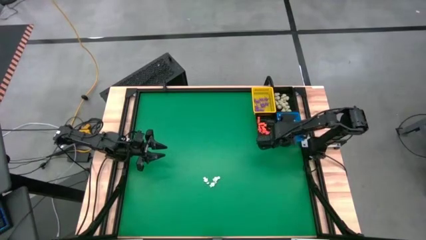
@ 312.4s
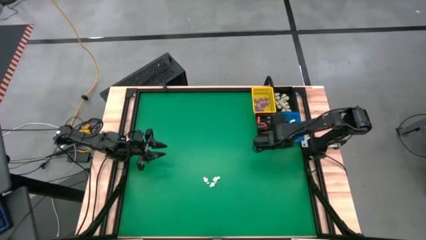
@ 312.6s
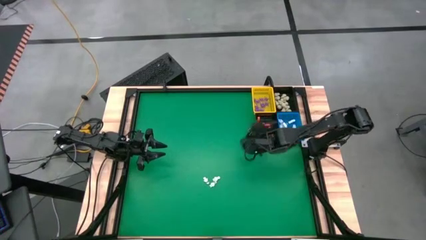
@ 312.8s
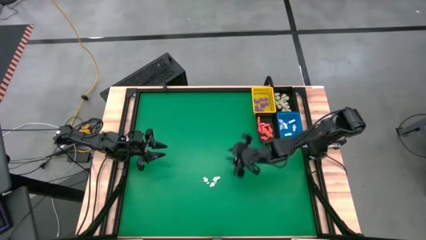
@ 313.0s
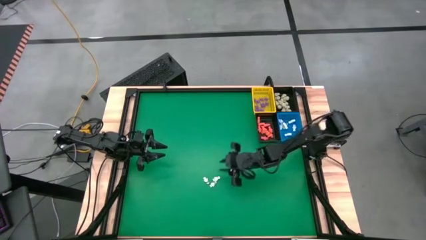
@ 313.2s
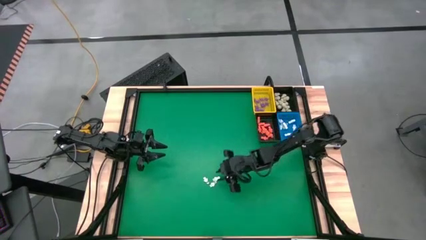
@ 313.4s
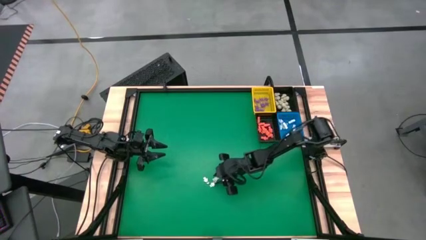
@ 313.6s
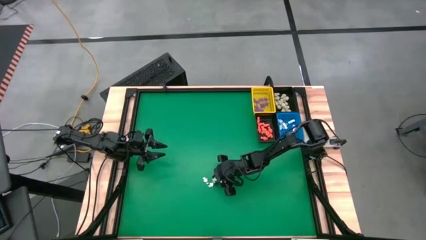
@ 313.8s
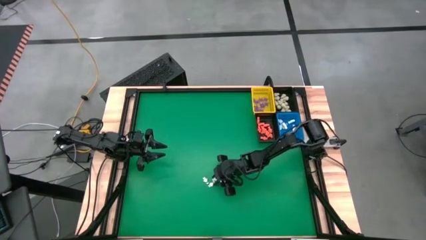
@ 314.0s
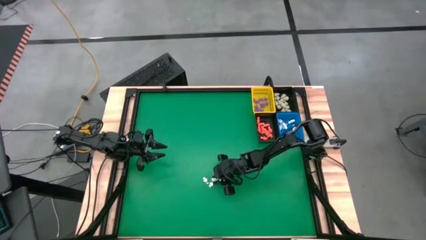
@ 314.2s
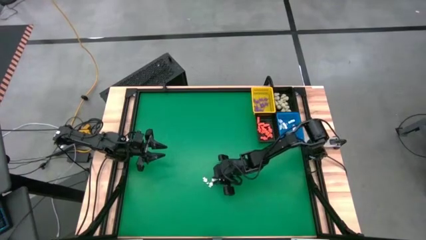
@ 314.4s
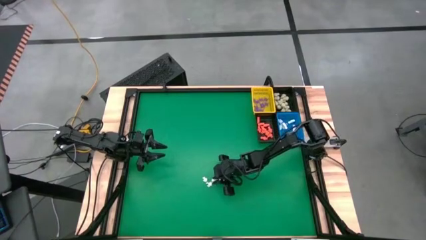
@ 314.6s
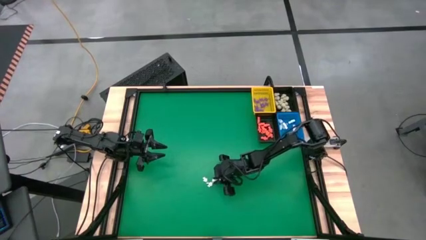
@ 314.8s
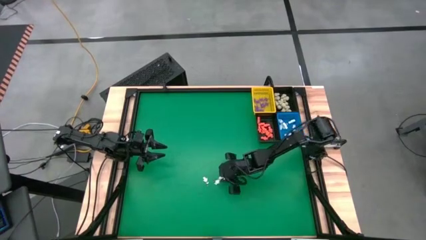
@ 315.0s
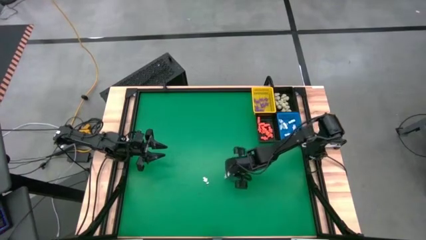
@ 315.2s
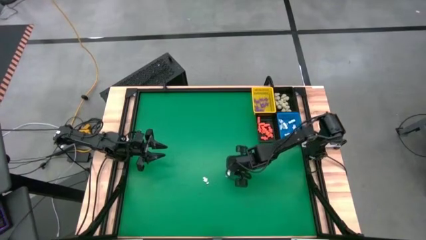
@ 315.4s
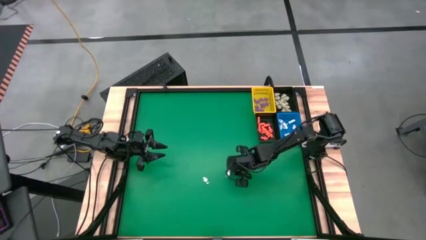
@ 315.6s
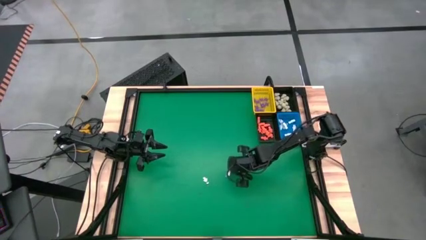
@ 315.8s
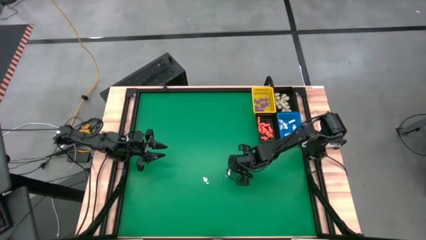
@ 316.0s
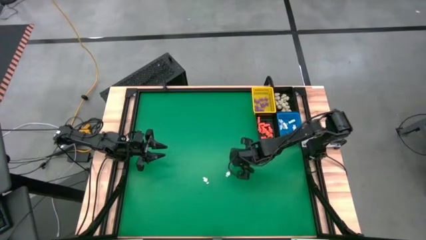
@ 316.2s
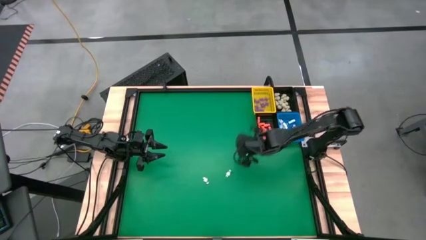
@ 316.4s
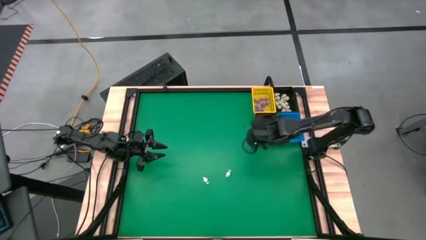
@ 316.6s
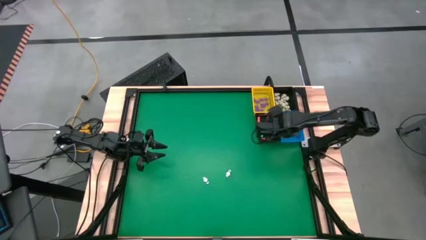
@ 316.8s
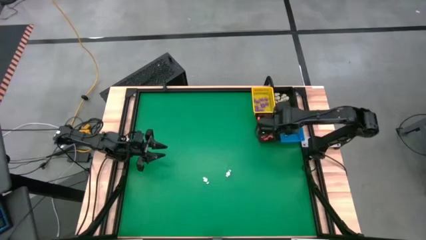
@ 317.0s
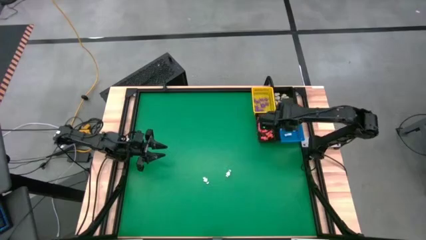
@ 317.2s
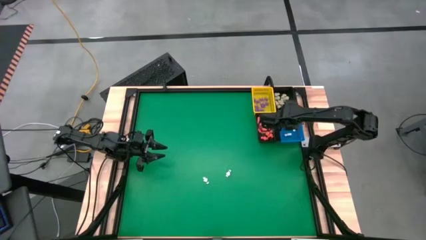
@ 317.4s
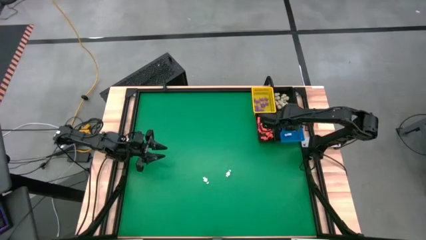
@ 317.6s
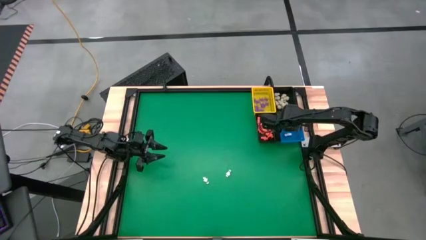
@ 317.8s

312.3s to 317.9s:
Task: Sort Halloween decoration
Put the white skeleton toy into the blue basket

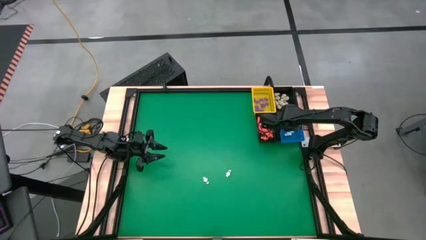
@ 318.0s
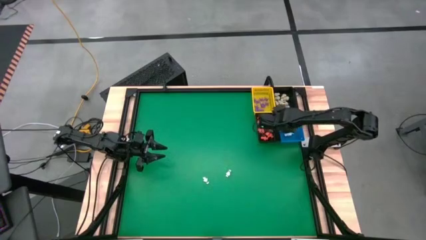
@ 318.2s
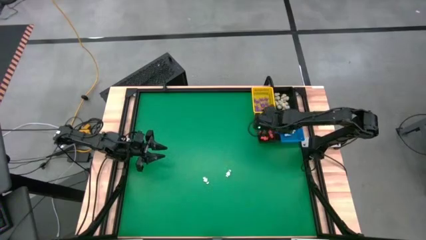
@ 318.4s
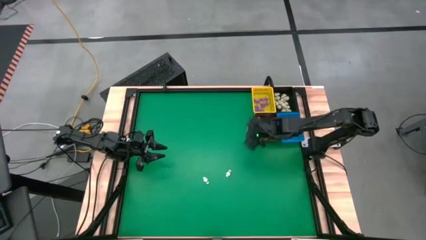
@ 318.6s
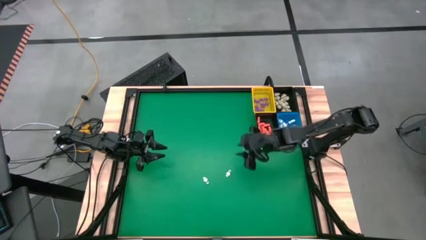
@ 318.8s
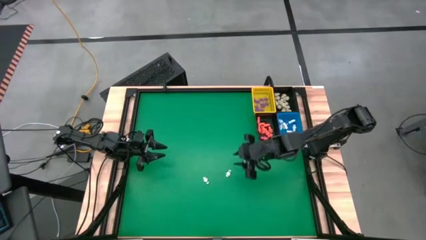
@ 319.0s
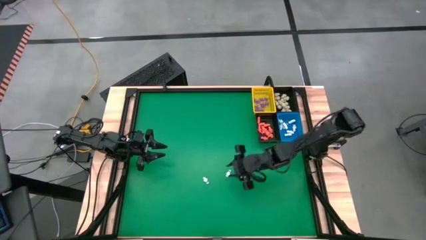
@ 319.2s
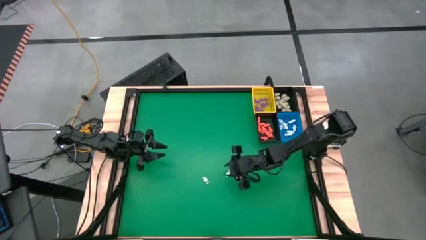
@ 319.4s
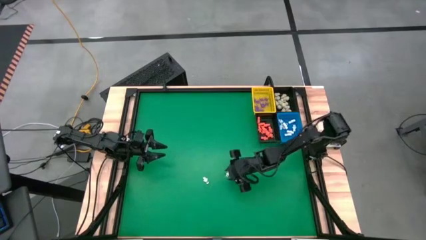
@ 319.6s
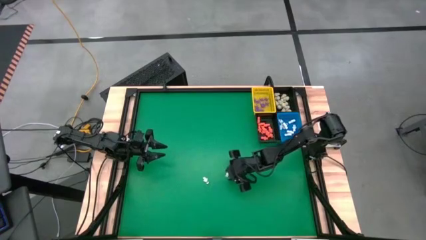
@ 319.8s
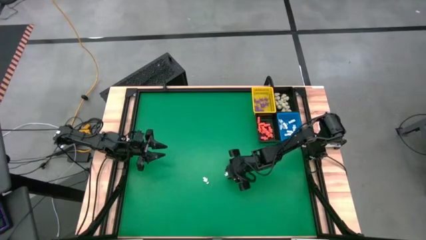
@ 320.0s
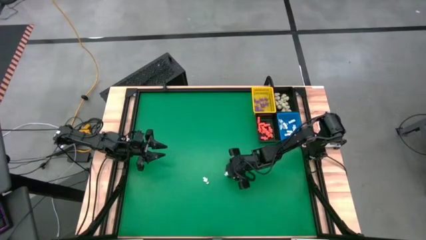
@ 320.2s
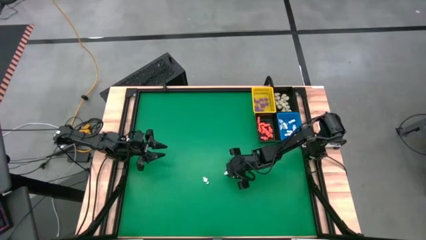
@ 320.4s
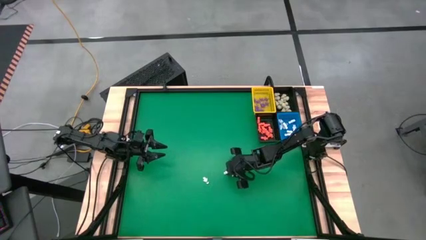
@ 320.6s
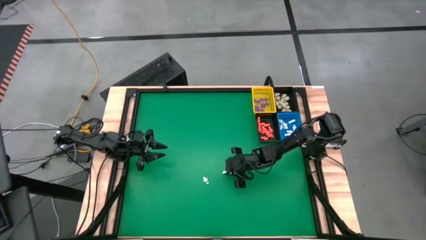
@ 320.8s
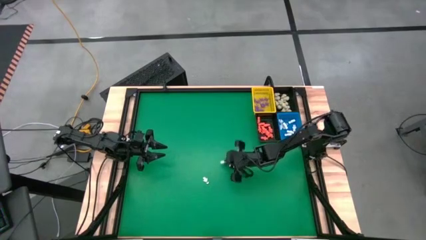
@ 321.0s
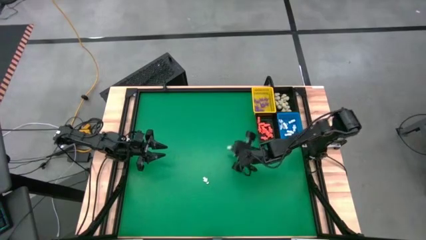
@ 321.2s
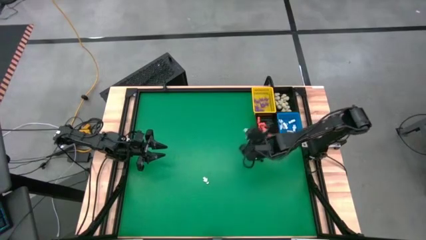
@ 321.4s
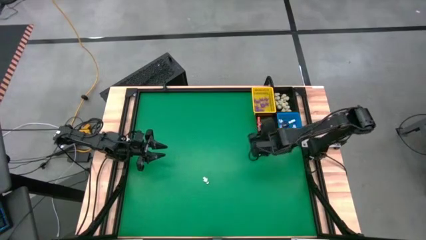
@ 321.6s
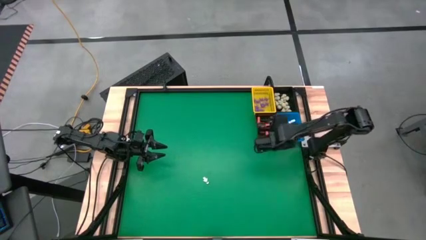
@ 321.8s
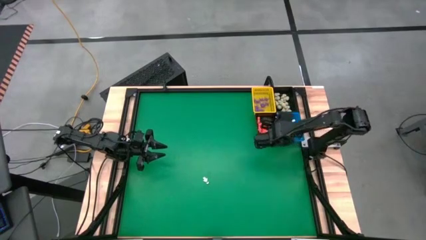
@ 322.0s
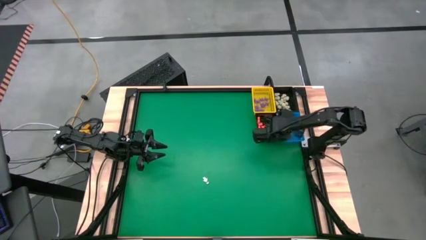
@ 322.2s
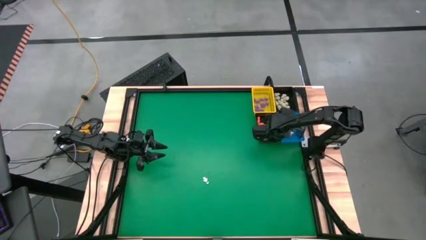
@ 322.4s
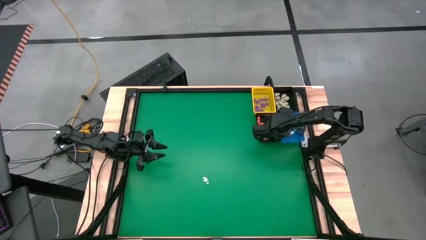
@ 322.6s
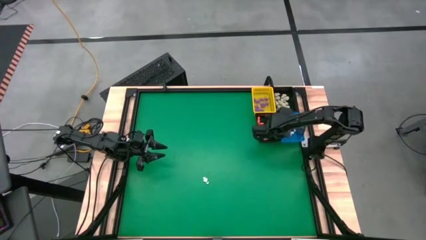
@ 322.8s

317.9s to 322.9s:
Put the white skeleton toy into the blue basket

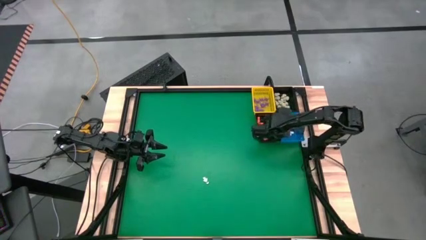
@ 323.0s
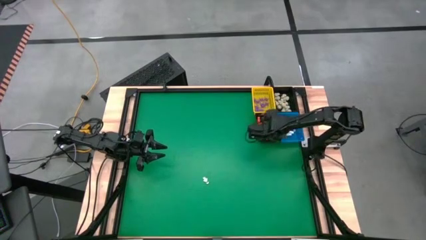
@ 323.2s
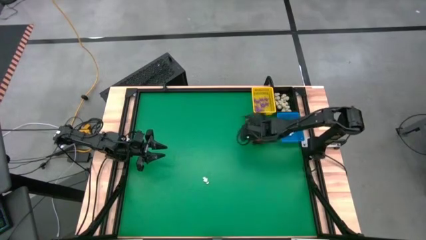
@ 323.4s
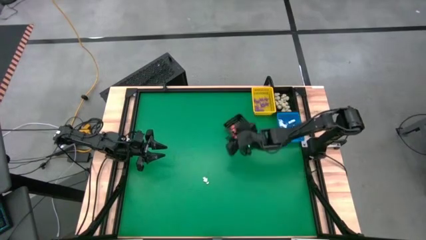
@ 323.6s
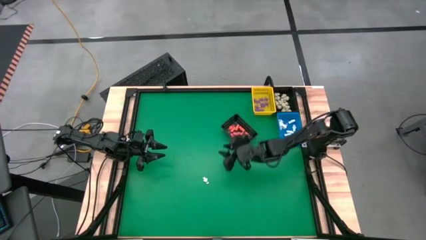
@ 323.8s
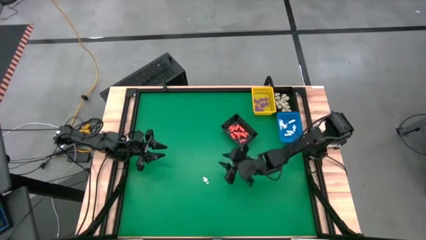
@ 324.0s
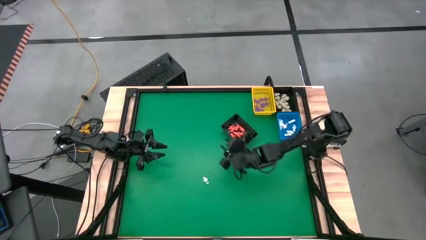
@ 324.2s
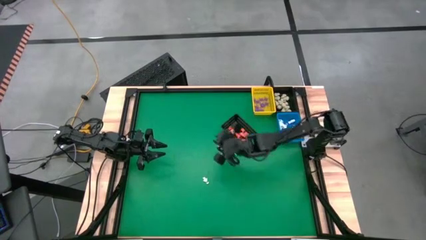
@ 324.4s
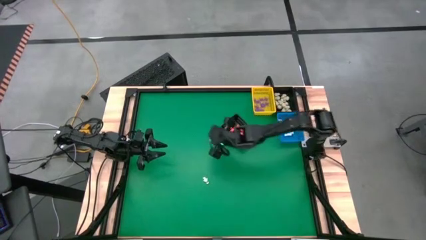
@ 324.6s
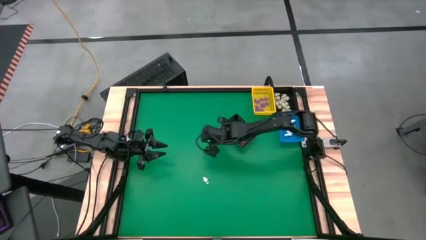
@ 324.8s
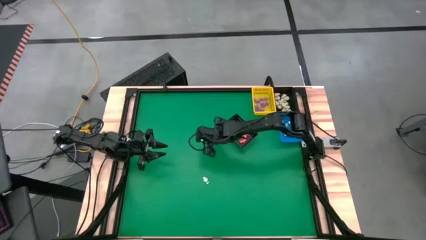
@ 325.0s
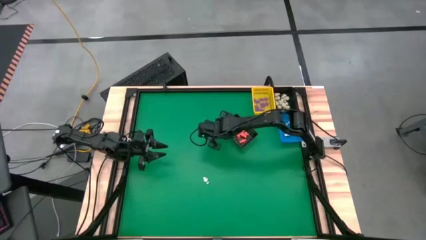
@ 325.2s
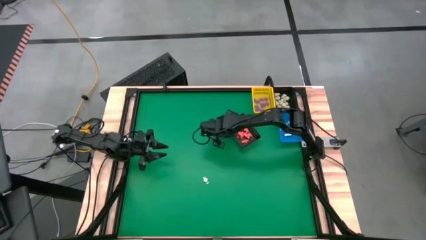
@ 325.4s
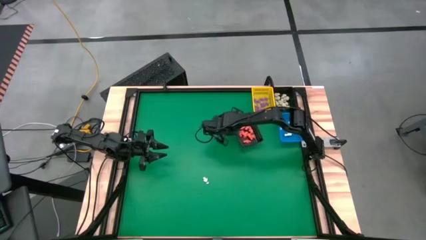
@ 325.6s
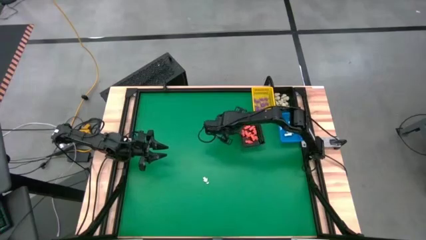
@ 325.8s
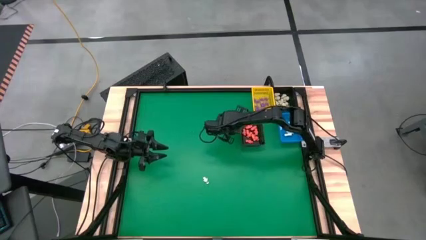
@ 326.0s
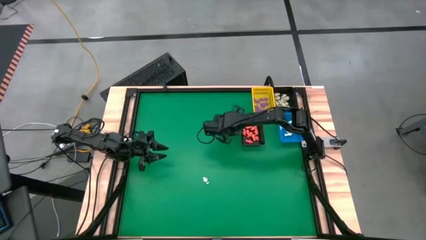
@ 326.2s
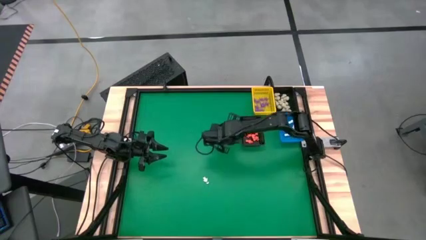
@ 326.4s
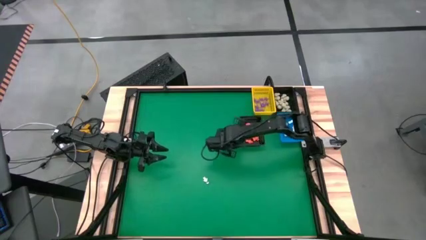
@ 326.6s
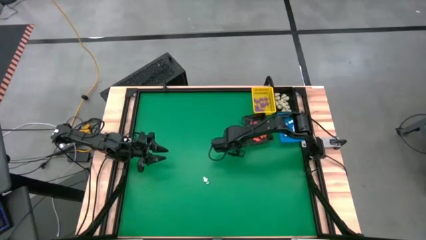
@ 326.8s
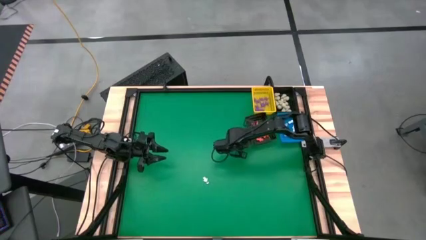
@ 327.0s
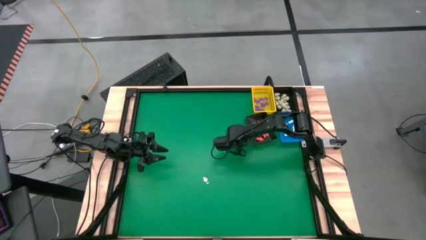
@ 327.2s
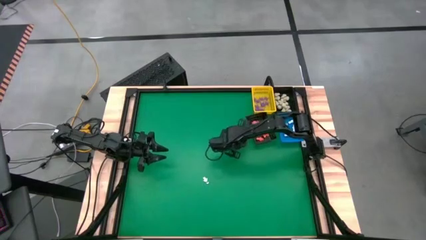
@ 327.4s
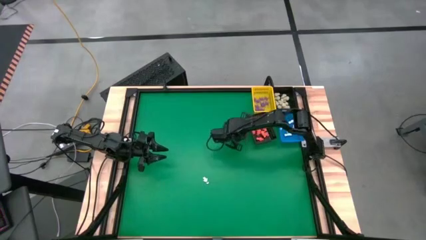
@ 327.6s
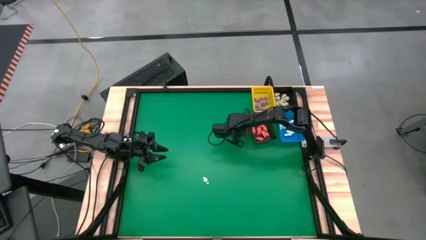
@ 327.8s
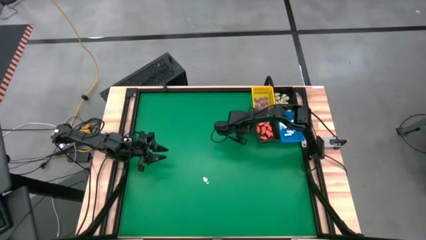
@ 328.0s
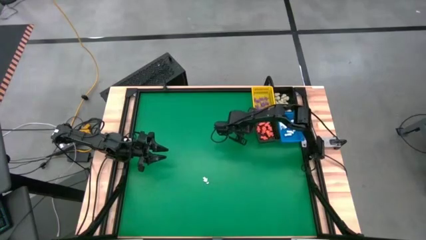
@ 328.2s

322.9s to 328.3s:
Adjust the bottom black basket on the table
